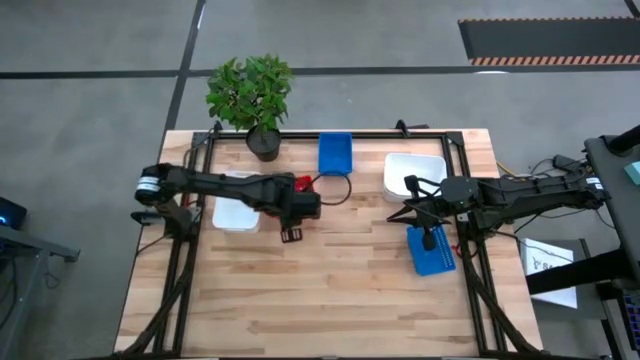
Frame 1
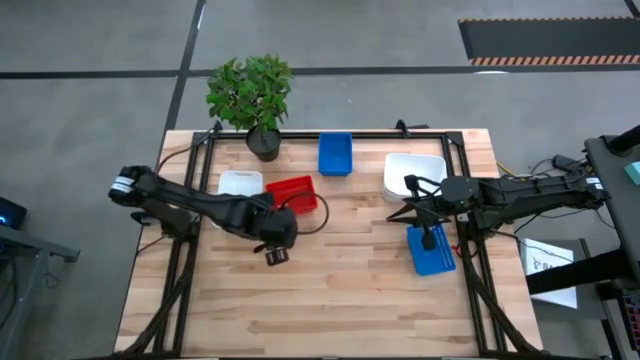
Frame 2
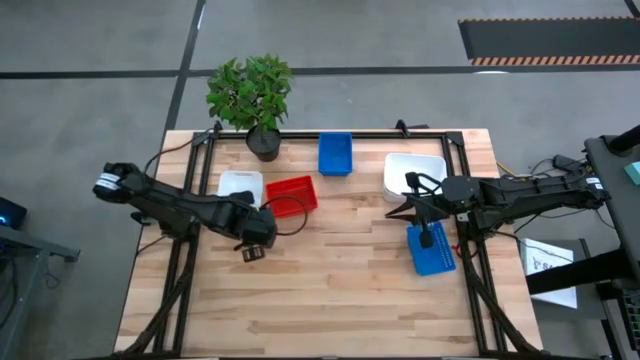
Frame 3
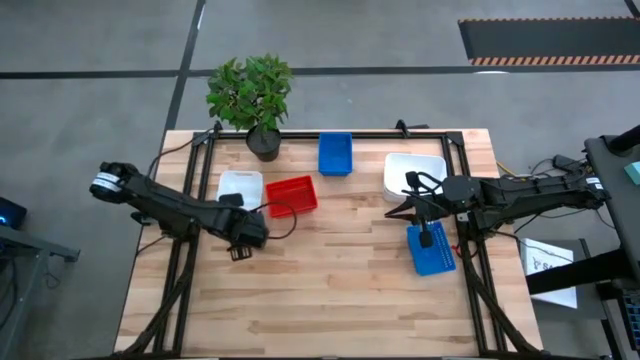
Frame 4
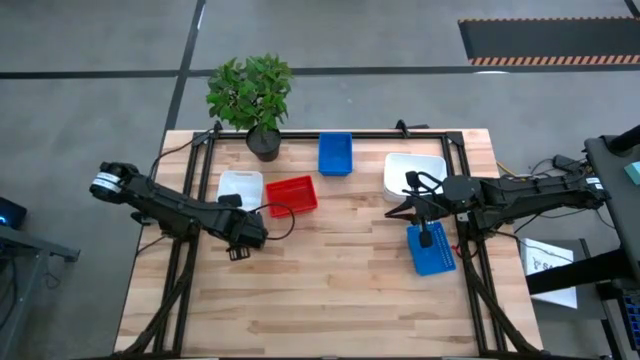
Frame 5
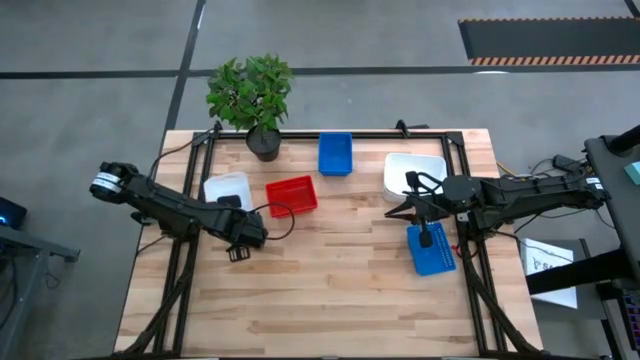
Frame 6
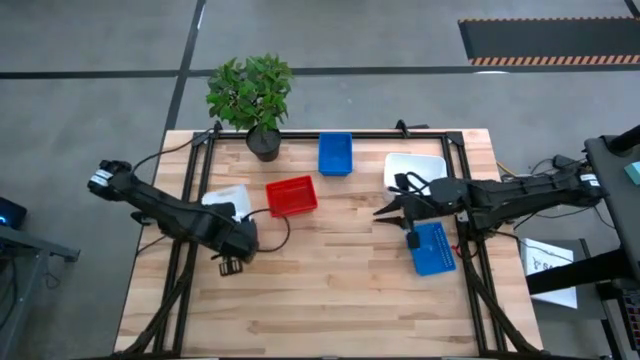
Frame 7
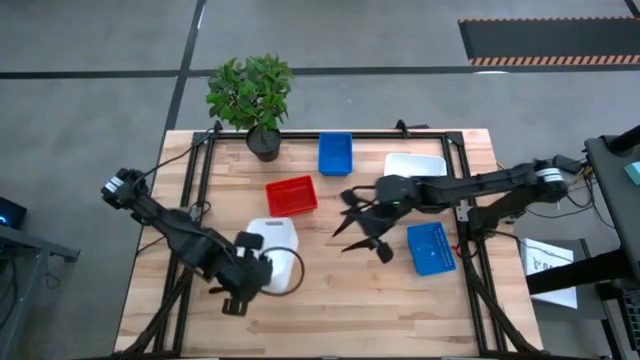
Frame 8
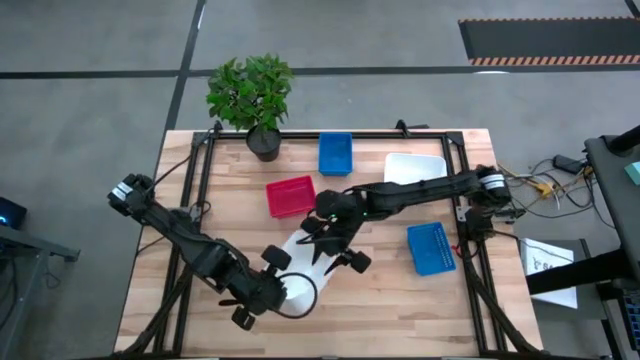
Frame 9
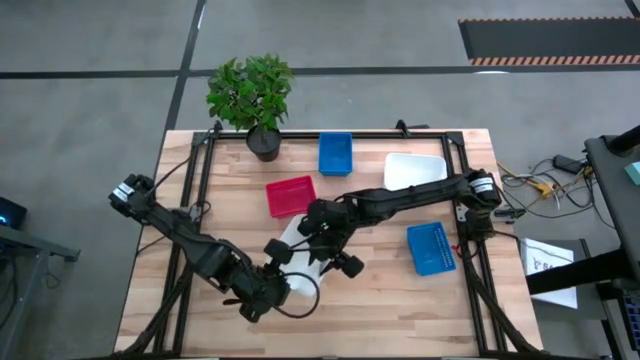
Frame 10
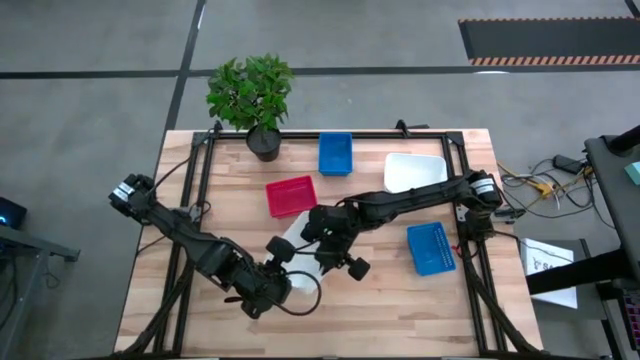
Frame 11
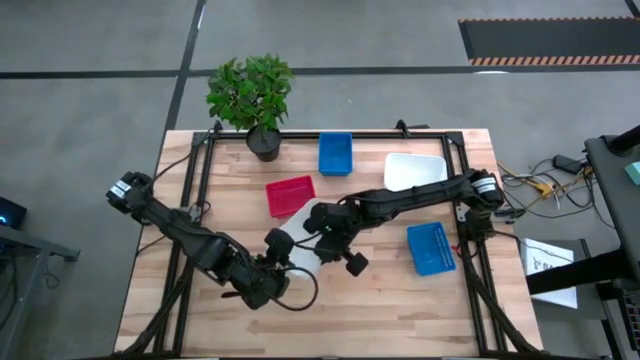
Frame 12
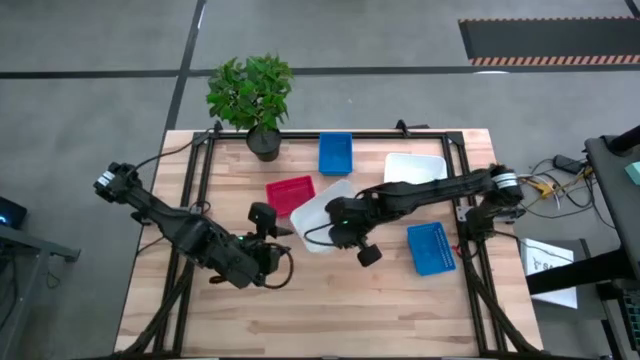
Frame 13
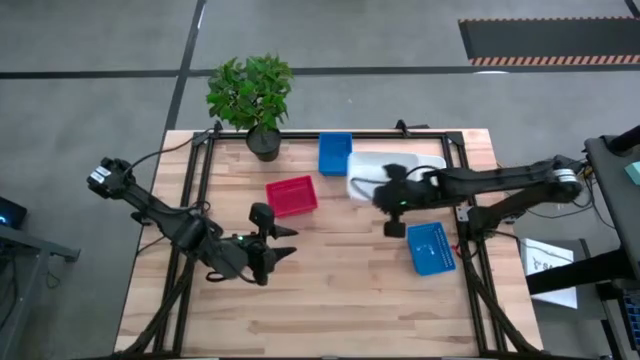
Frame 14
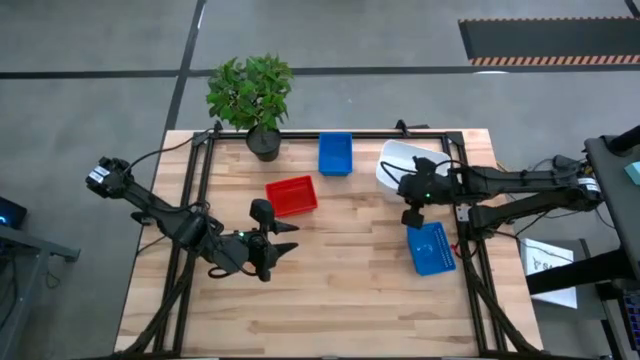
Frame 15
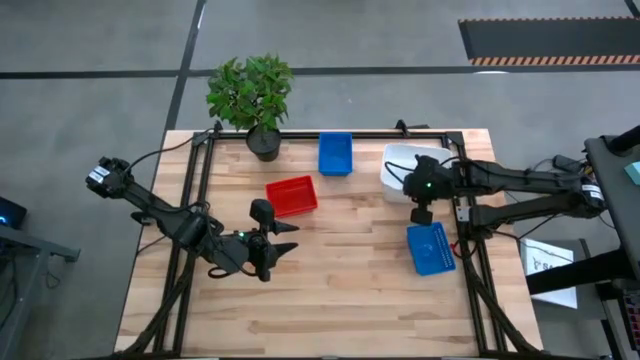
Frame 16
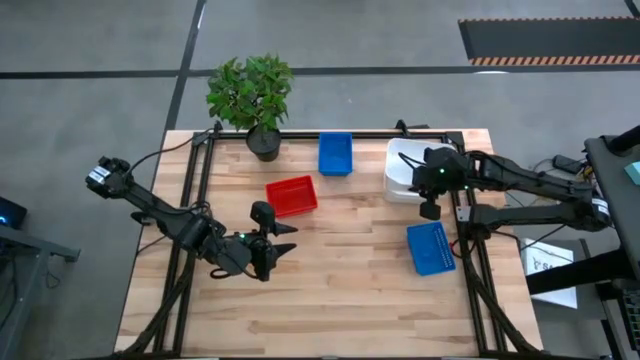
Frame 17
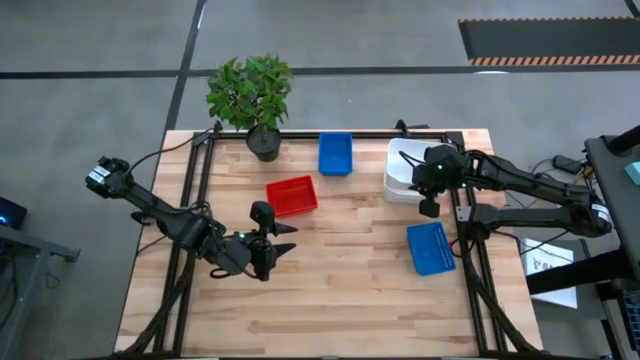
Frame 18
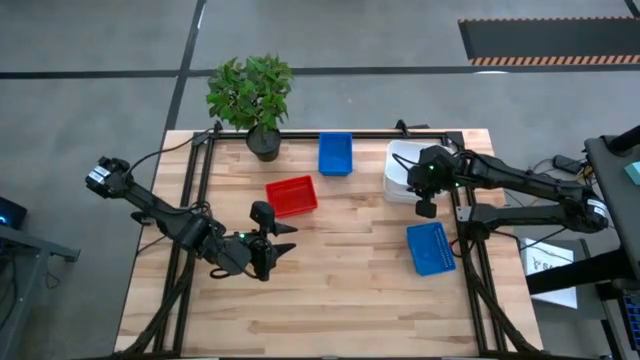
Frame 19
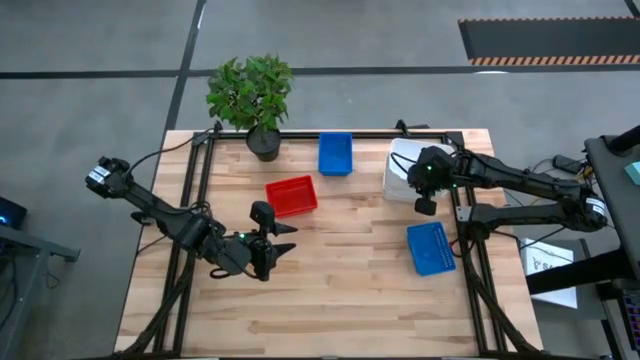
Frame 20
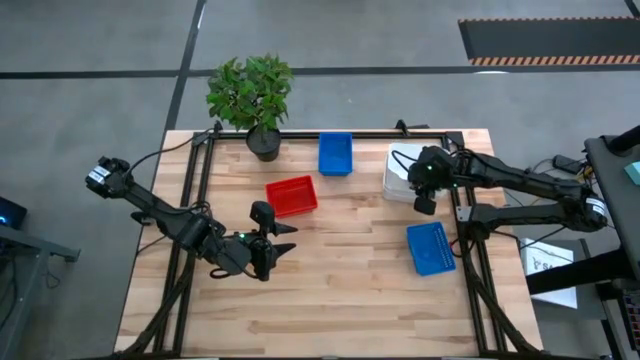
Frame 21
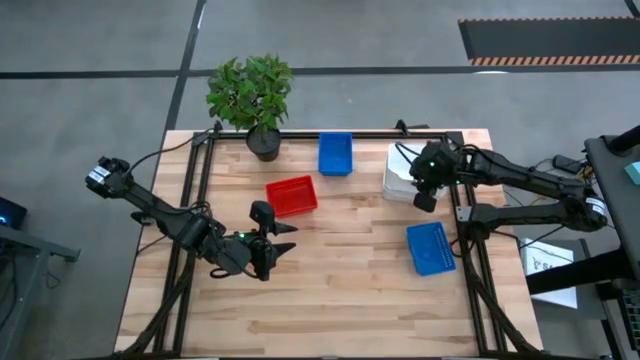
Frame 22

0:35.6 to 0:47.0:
Stack the left white bin on the left stacked white bins

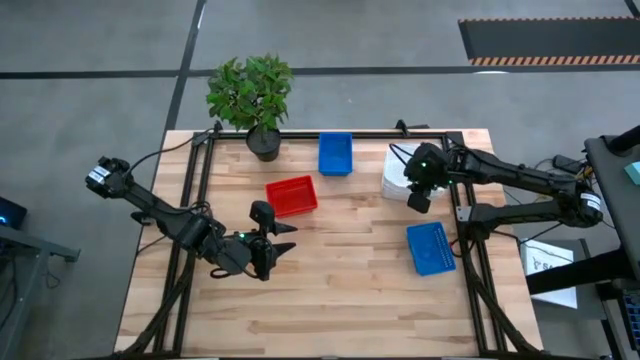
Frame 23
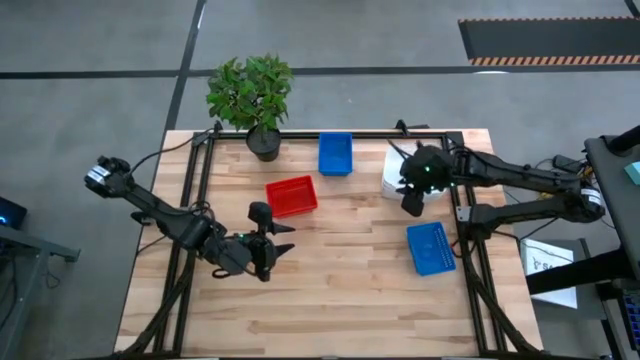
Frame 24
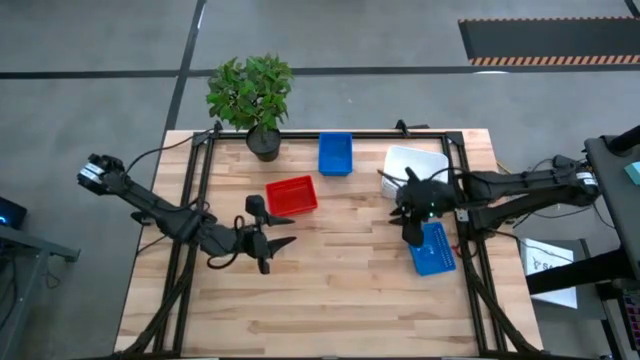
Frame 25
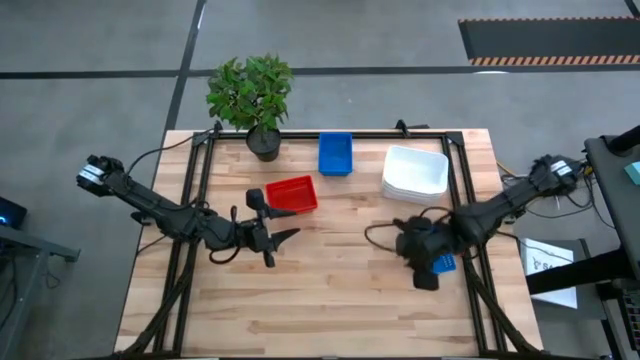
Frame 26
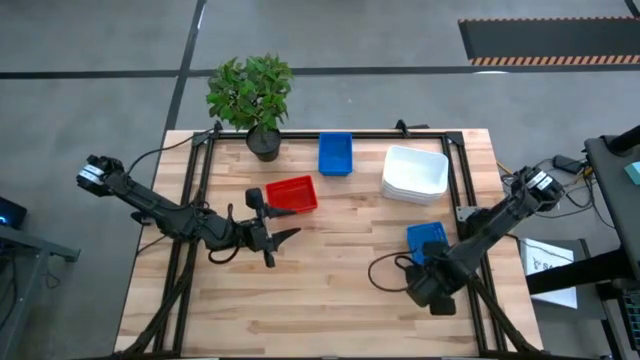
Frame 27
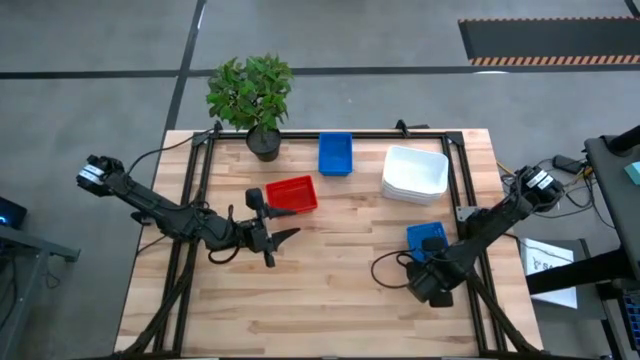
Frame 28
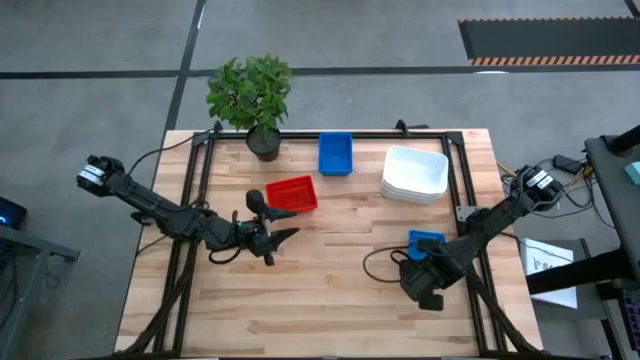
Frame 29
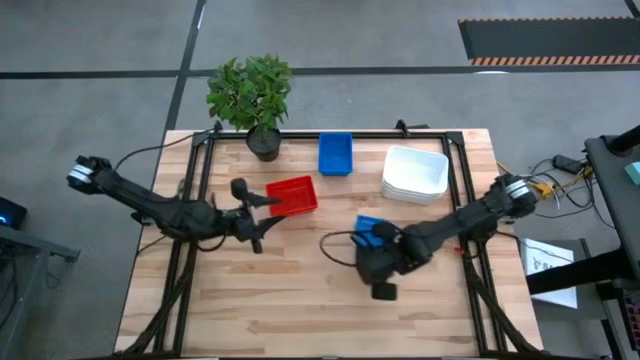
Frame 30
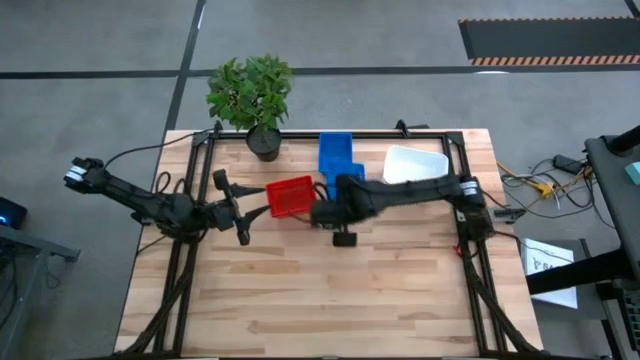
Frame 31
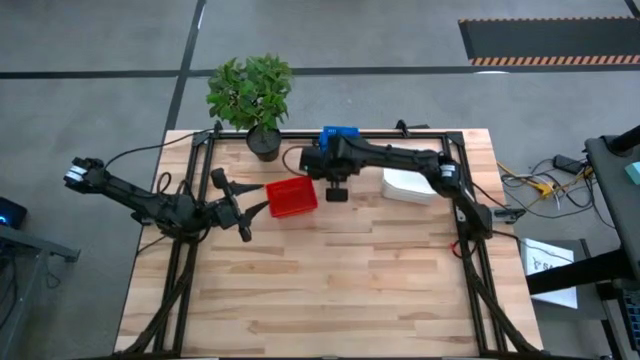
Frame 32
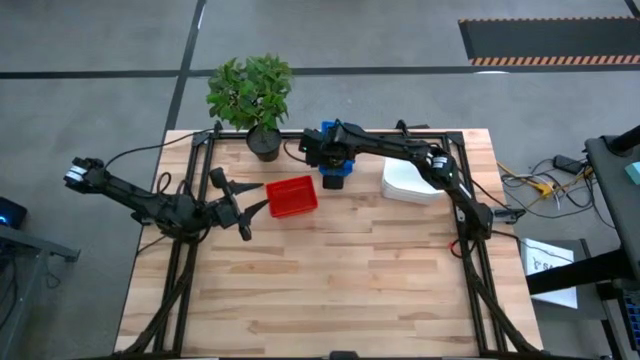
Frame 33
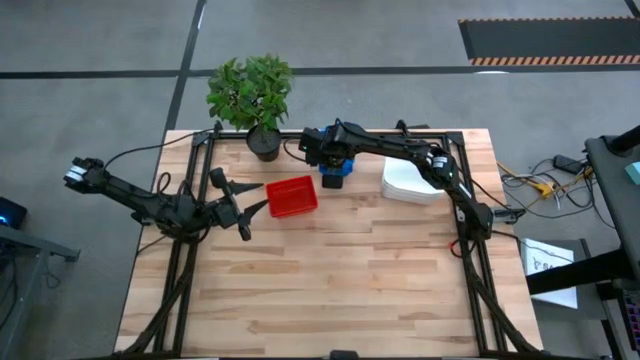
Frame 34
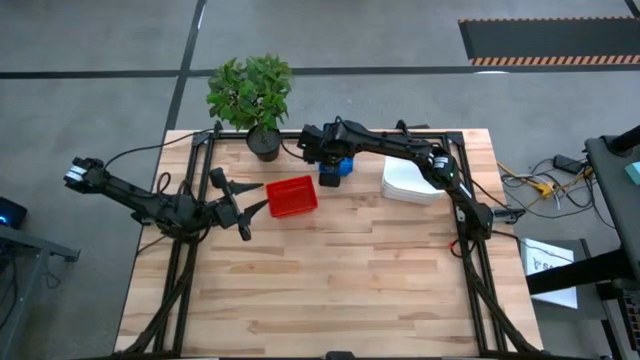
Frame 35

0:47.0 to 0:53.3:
Stack the bottom blue bin on the top stacked blue bins

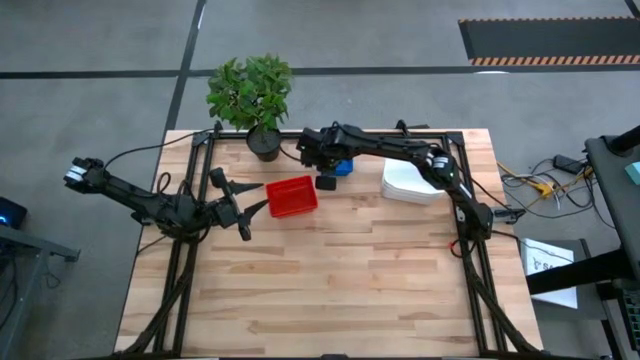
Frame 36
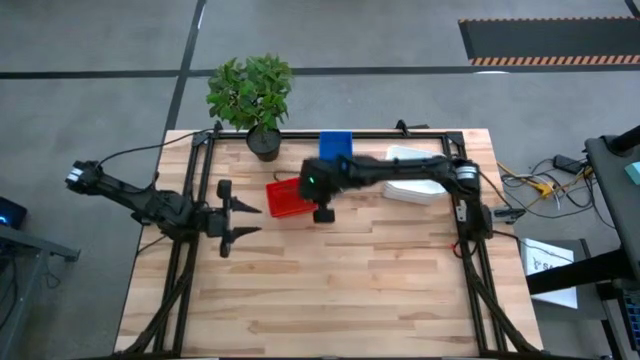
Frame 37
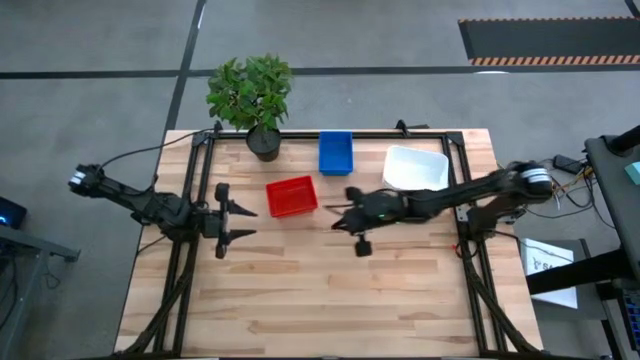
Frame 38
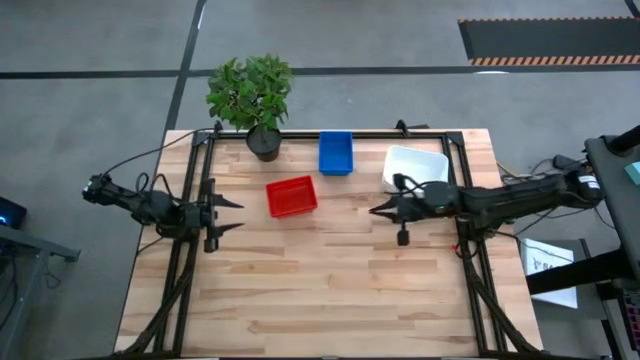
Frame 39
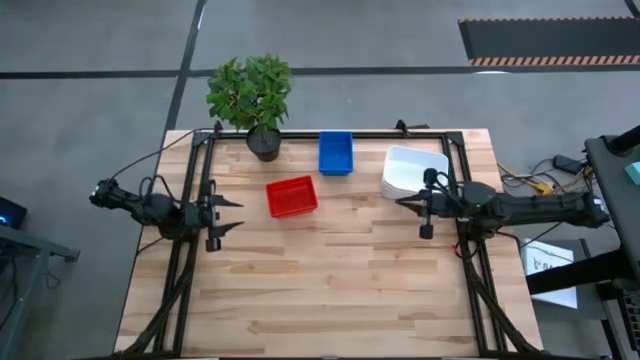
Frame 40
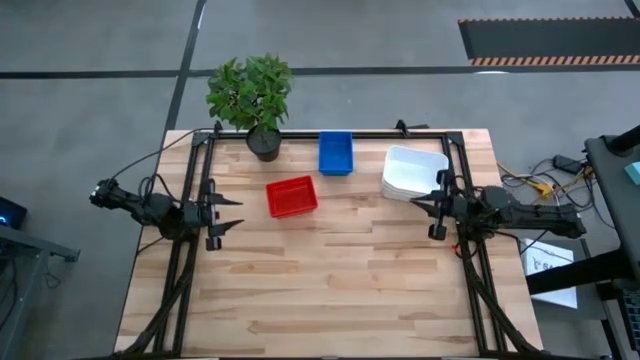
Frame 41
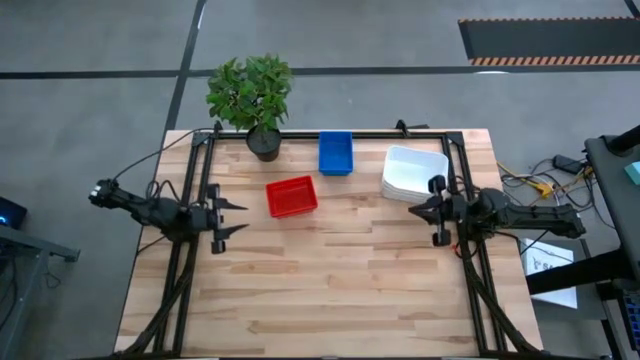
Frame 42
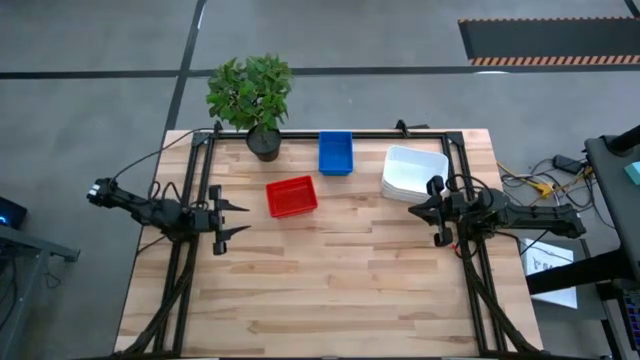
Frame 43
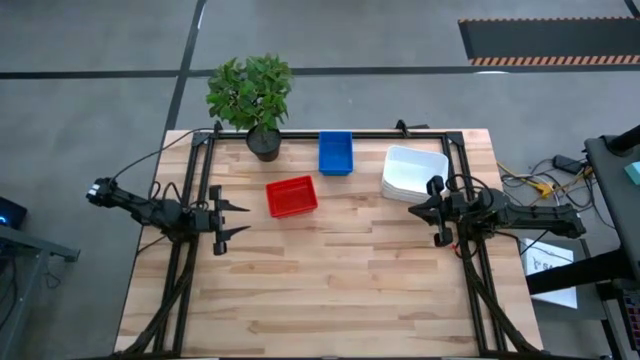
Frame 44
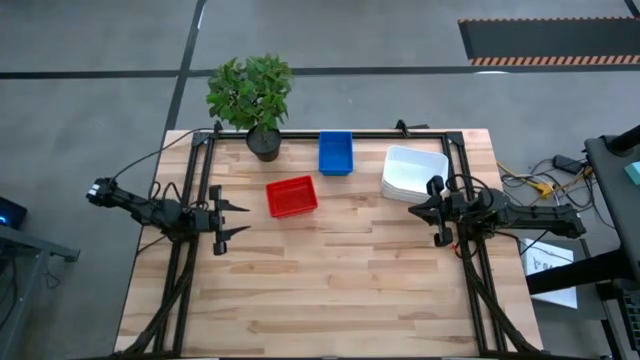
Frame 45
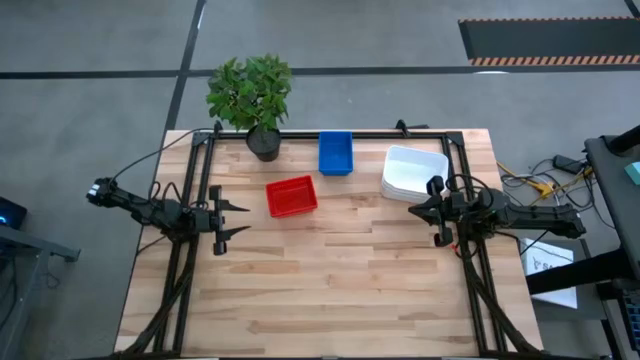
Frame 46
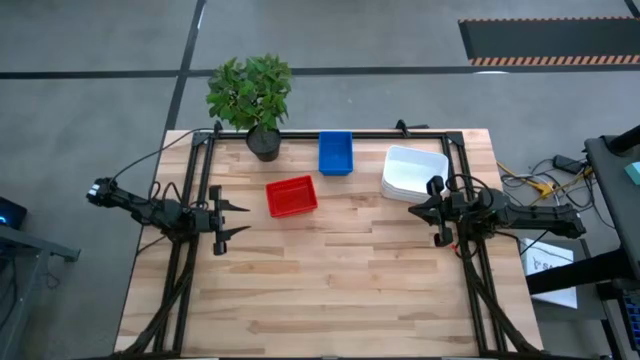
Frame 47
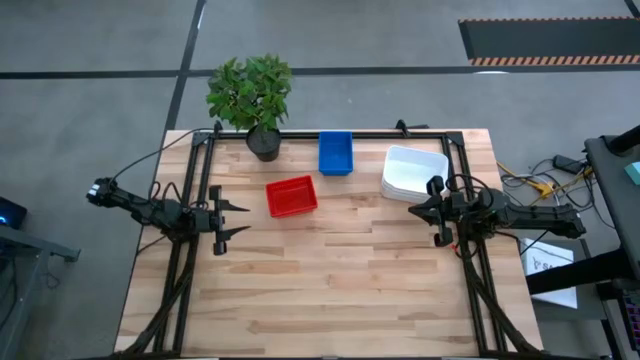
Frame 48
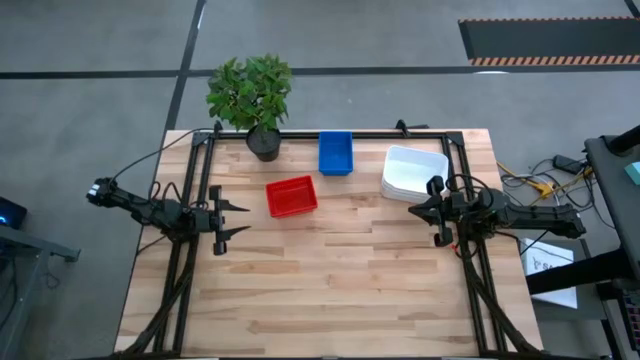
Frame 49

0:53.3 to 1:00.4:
Return to Home Position
